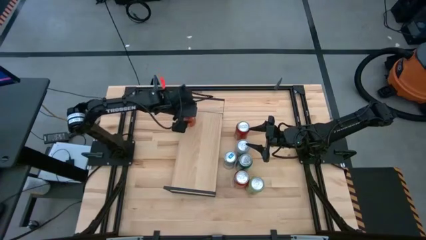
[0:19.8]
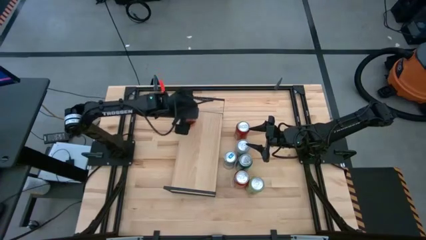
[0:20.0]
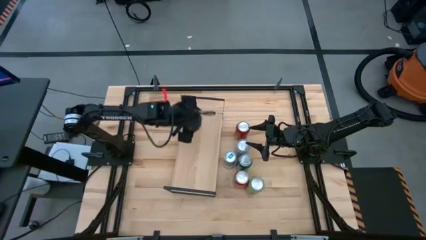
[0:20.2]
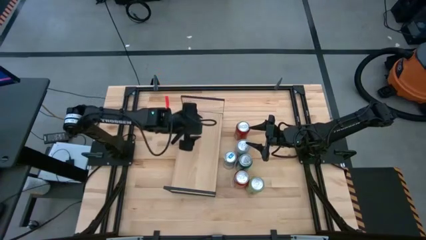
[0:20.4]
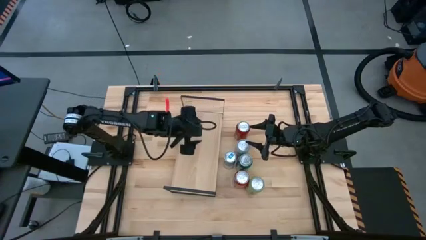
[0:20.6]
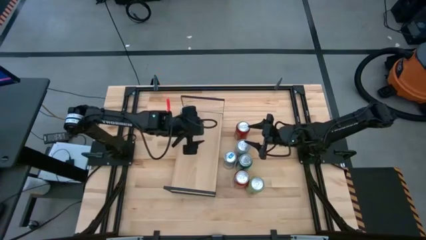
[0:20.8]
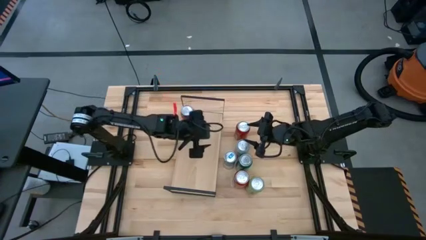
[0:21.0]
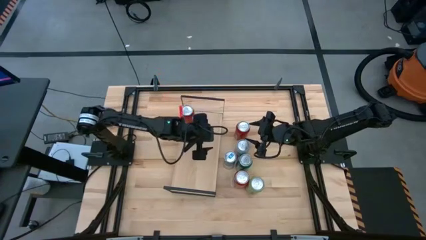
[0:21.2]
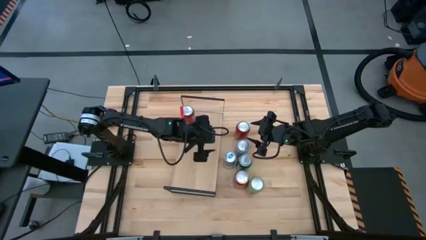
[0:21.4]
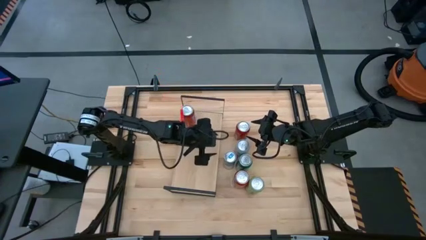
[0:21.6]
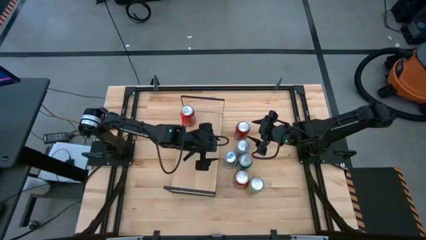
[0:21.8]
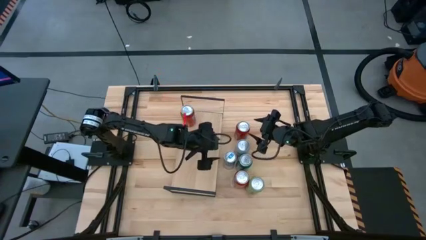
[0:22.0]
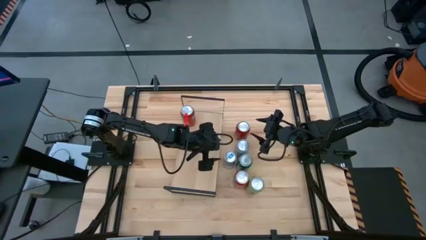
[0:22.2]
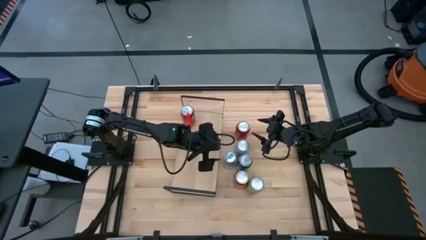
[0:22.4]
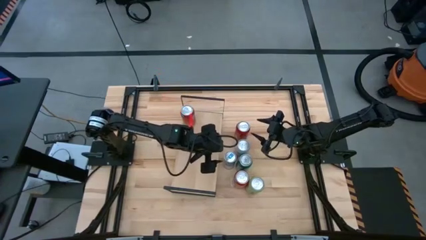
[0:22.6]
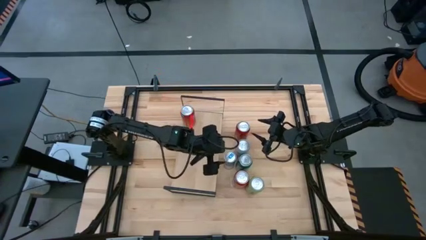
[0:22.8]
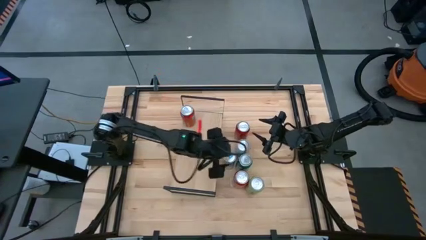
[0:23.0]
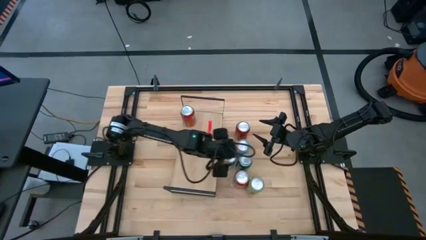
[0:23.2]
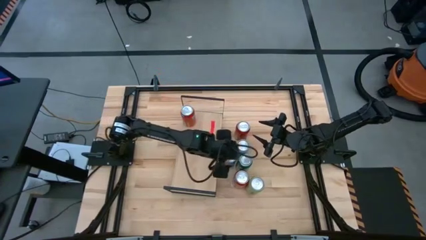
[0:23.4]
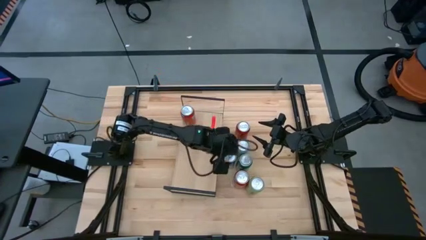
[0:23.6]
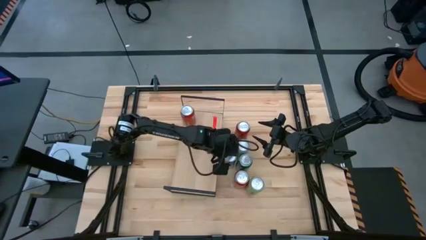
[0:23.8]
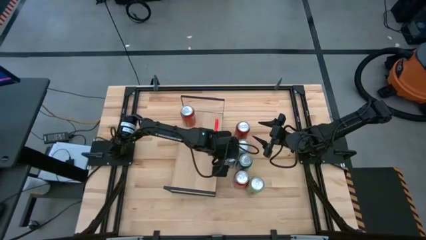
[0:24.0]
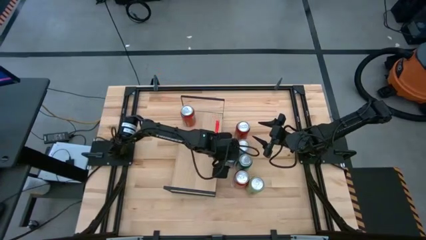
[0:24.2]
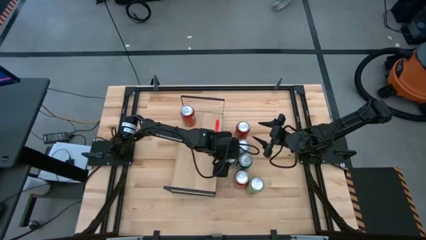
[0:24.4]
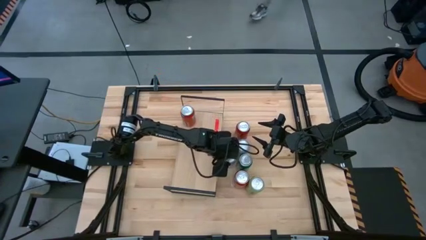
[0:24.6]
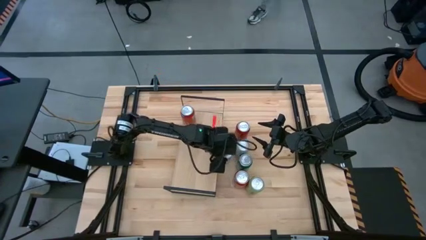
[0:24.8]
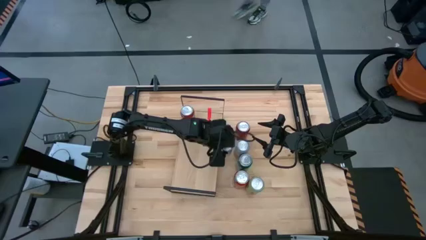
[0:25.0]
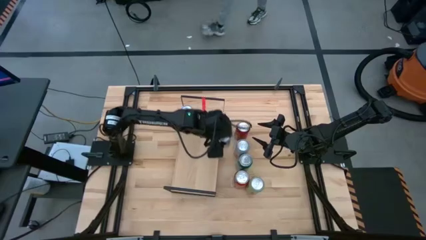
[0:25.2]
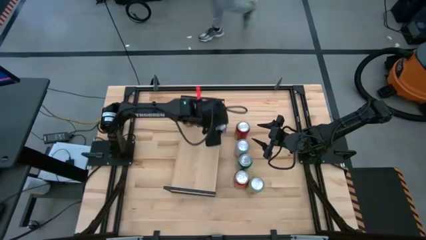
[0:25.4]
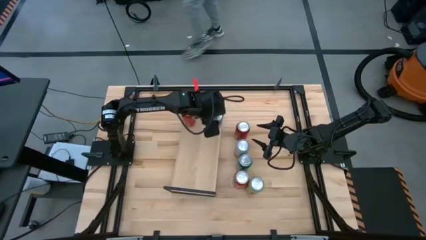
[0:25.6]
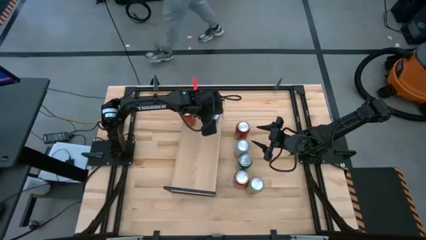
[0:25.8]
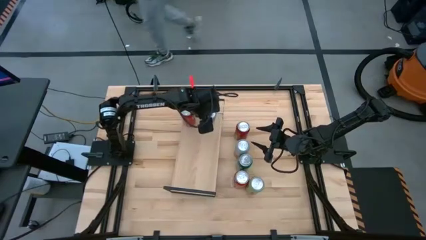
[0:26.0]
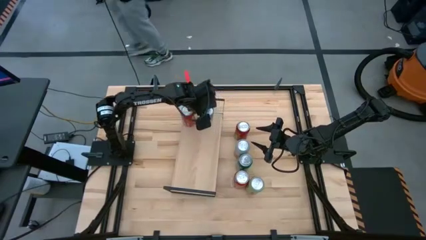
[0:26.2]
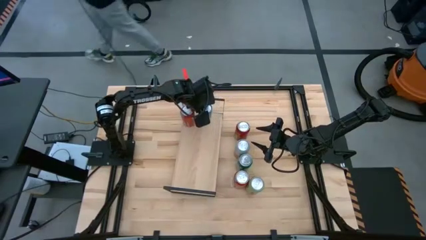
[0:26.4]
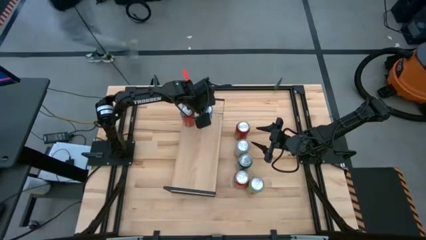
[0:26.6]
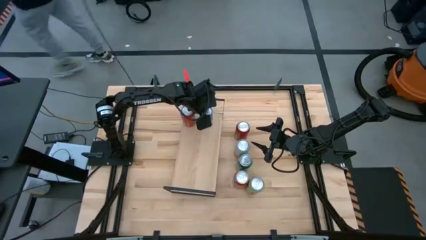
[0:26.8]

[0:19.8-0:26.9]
Task: Place canned beverage on shelf
Put the blue soda can on the shelf

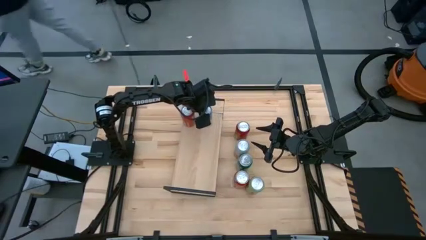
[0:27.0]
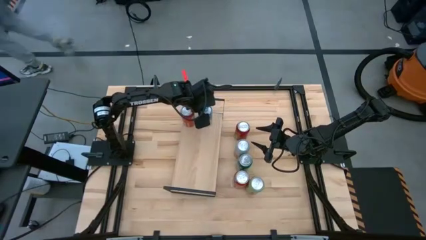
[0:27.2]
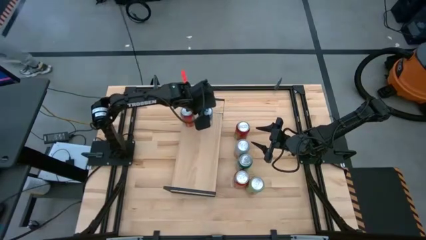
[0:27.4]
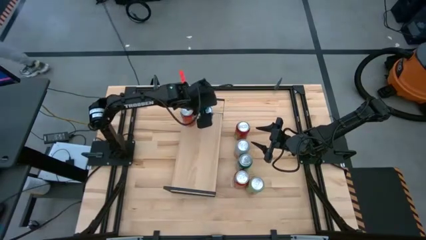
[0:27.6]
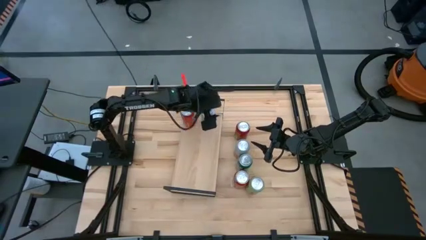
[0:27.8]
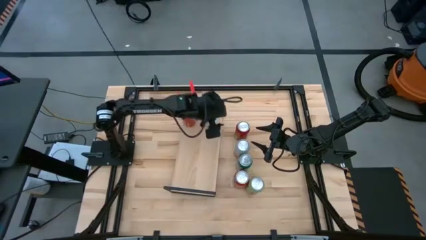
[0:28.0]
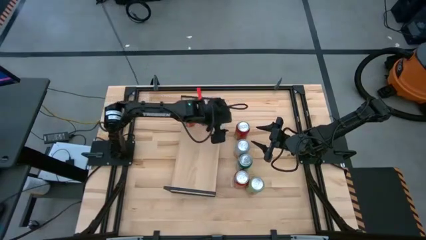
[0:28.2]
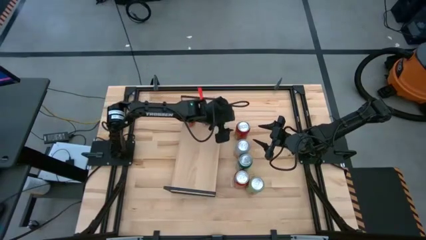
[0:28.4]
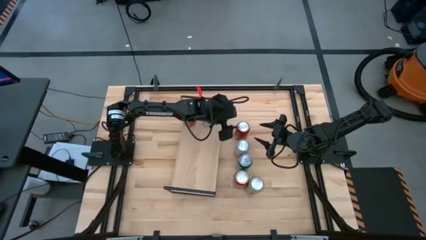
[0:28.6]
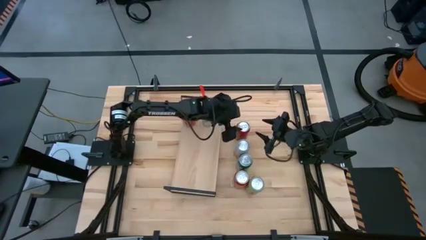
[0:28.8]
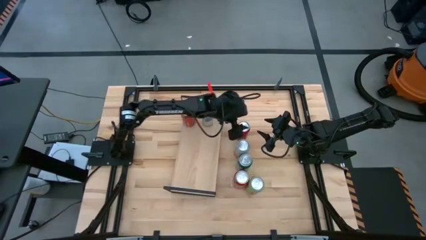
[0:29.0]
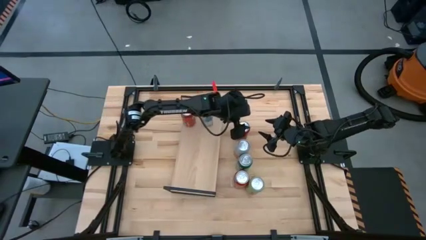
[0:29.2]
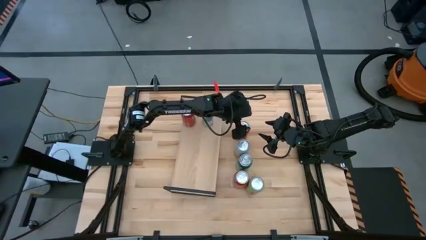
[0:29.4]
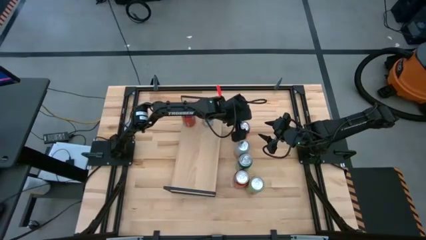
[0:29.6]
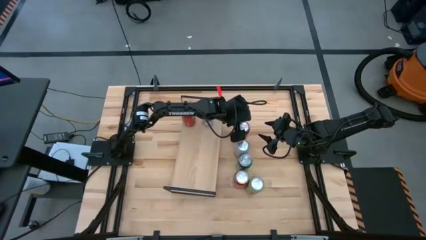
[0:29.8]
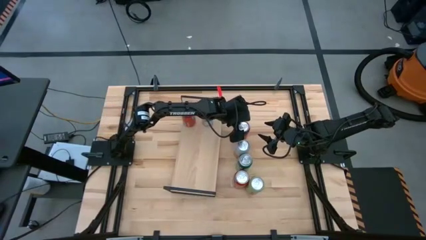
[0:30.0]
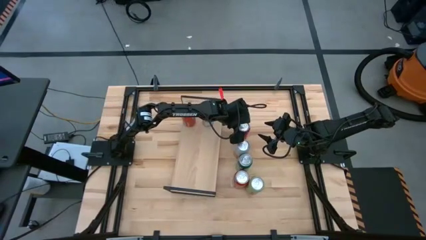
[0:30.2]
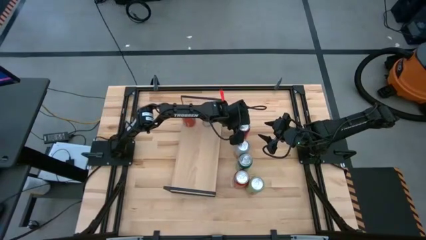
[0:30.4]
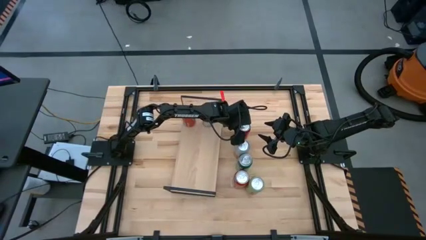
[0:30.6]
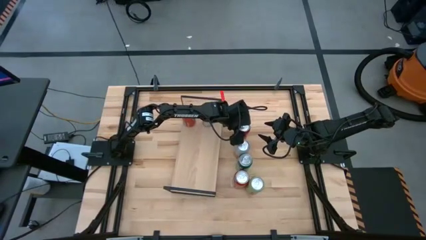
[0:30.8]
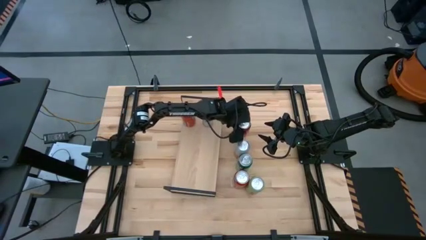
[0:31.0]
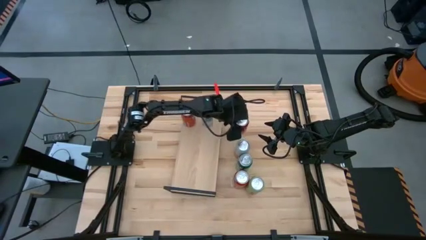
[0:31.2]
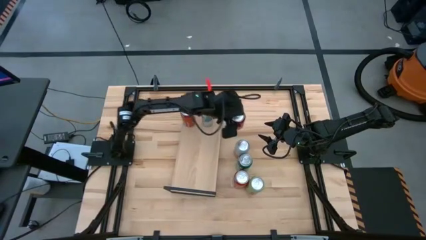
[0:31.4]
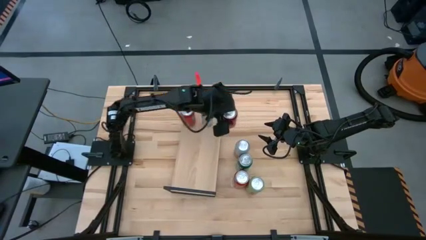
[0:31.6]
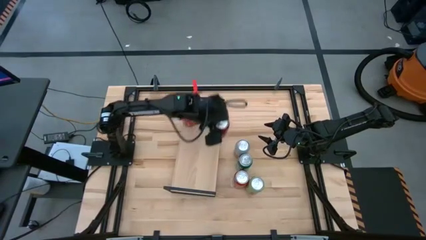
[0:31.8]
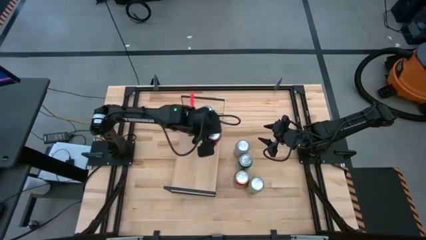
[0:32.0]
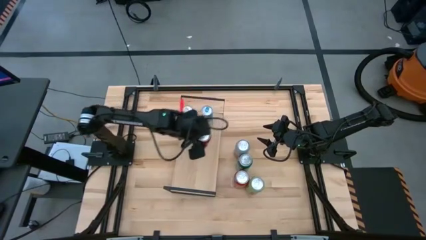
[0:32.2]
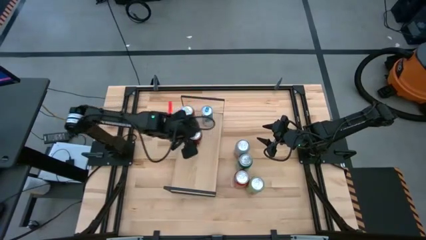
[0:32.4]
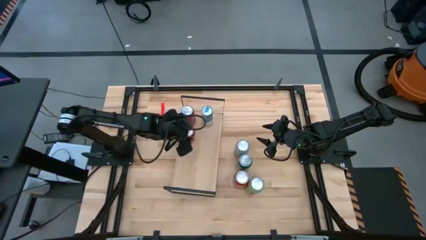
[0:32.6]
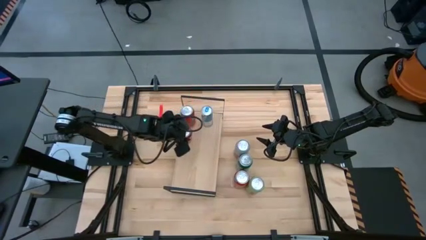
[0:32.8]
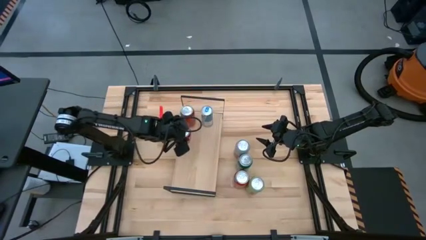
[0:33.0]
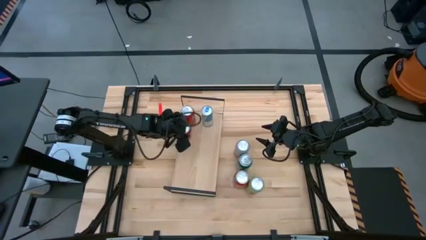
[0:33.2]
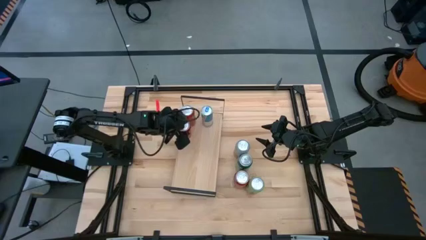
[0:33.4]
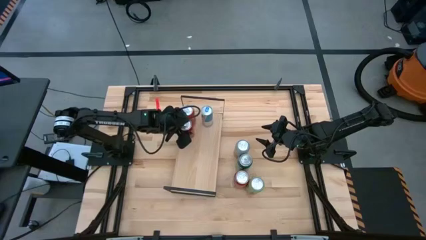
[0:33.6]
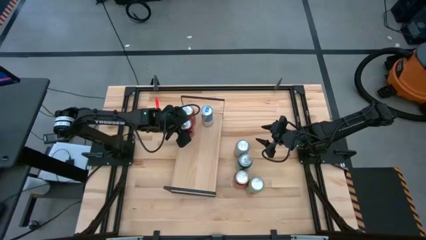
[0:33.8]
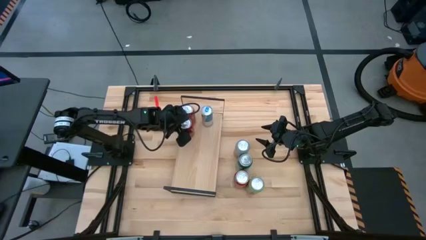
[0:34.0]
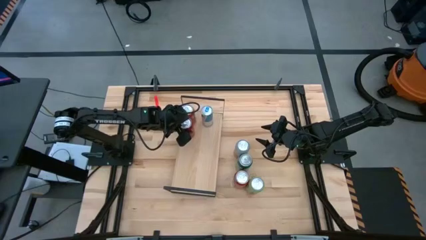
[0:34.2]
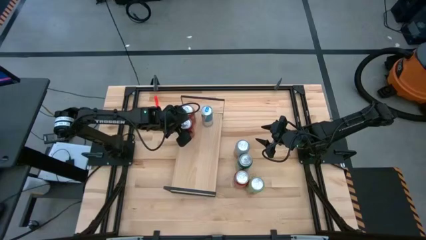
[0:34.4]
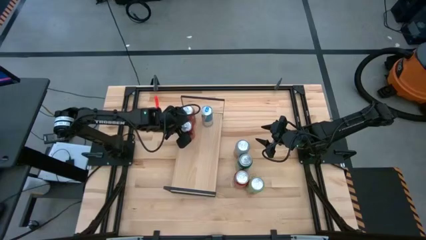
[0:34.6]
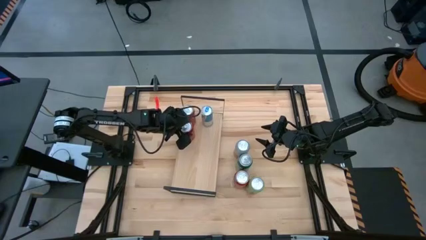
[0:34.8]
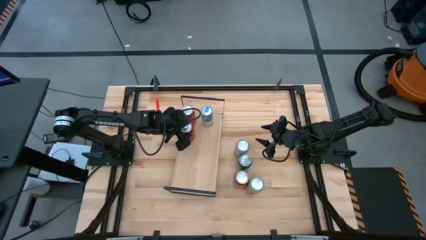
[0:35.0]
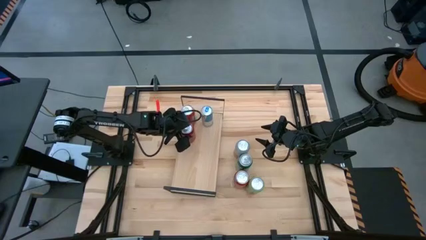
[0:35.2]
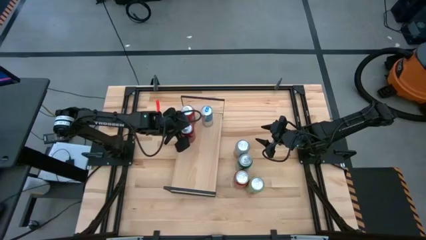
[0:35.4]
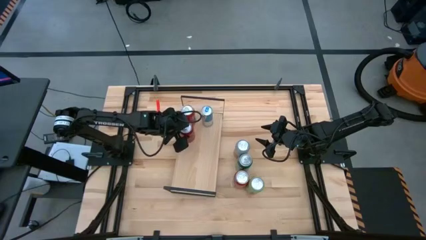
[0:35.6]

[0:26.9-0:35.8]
Put the red soda can on the shelf
